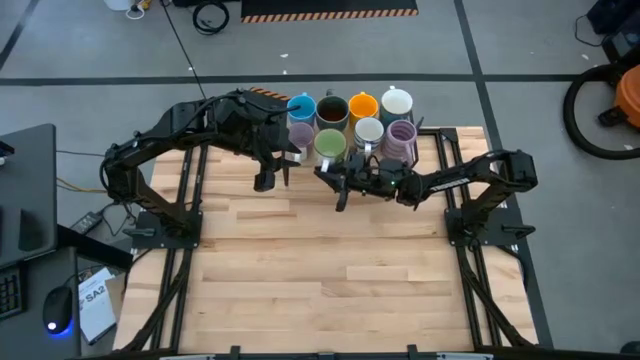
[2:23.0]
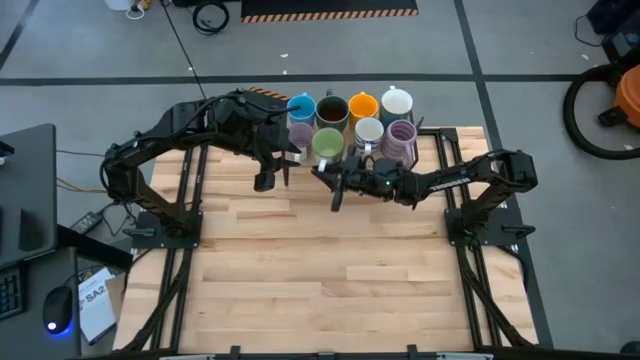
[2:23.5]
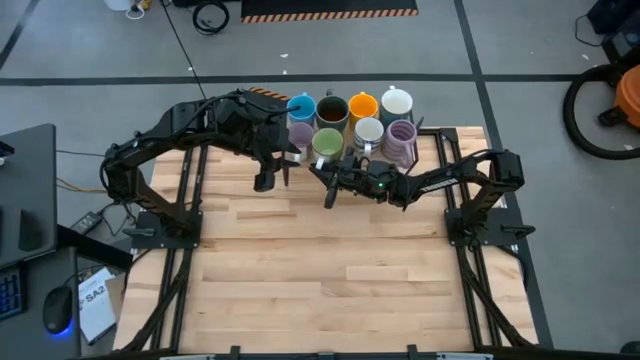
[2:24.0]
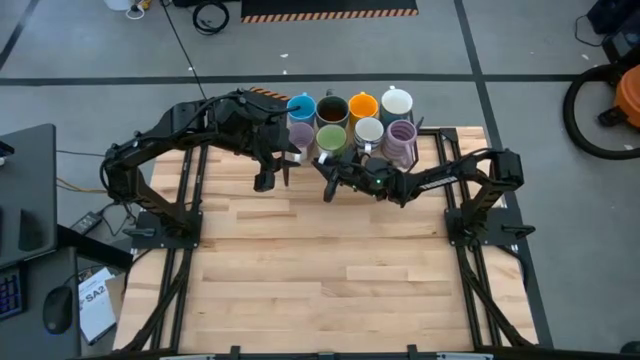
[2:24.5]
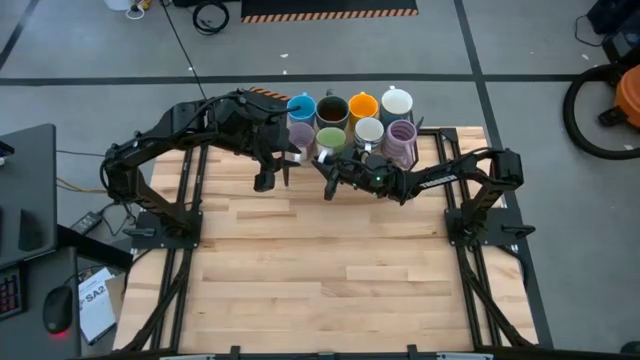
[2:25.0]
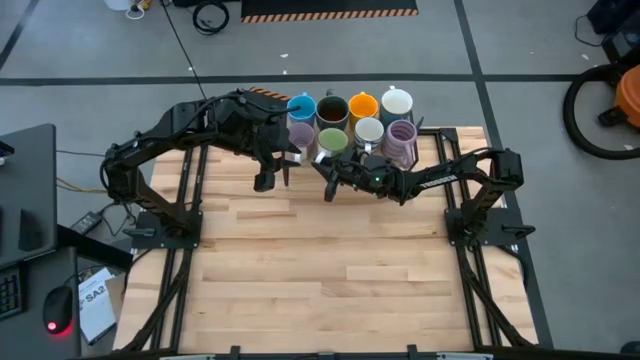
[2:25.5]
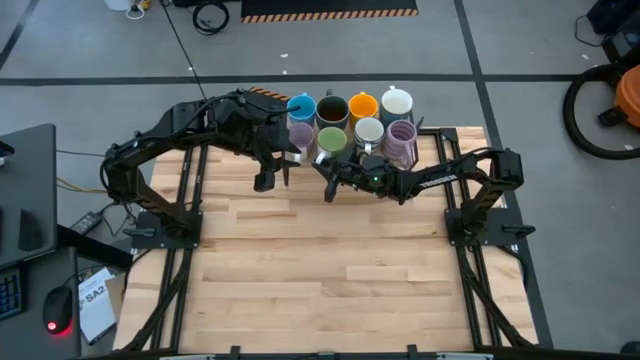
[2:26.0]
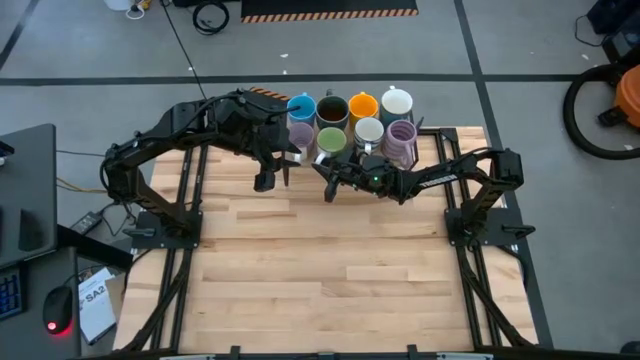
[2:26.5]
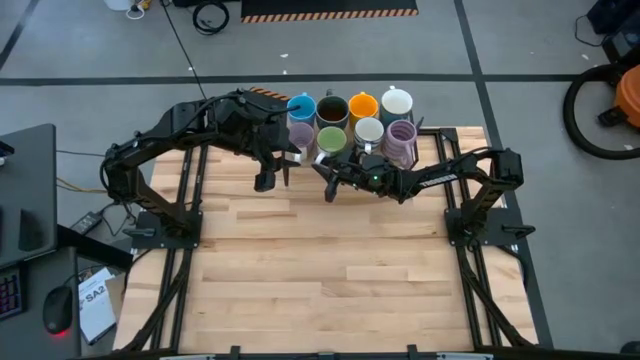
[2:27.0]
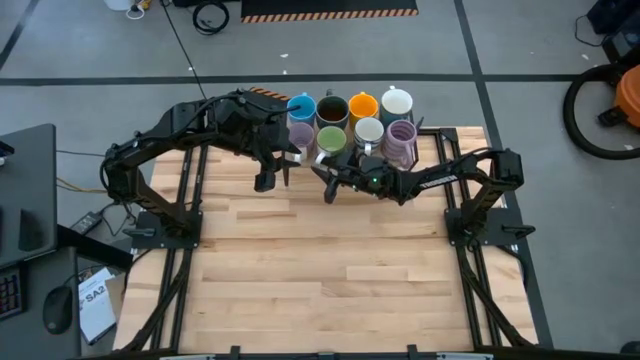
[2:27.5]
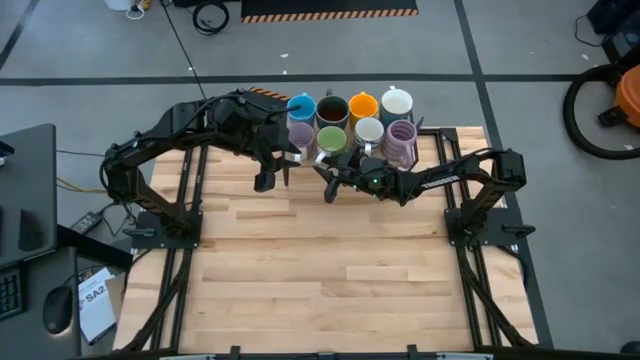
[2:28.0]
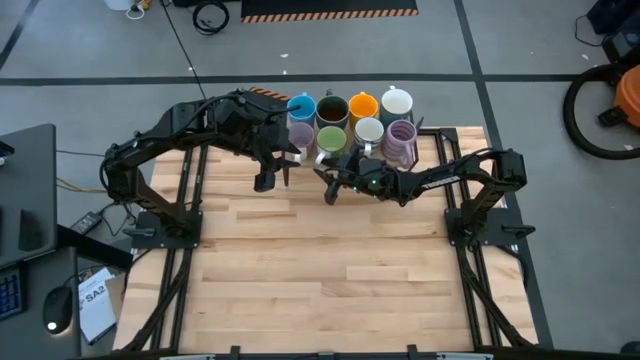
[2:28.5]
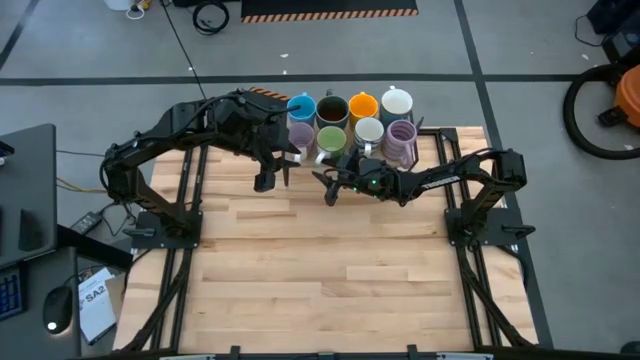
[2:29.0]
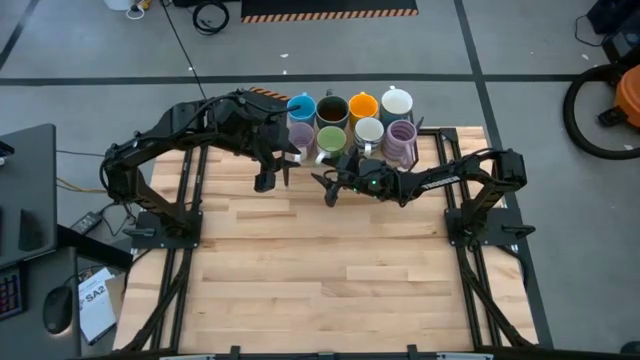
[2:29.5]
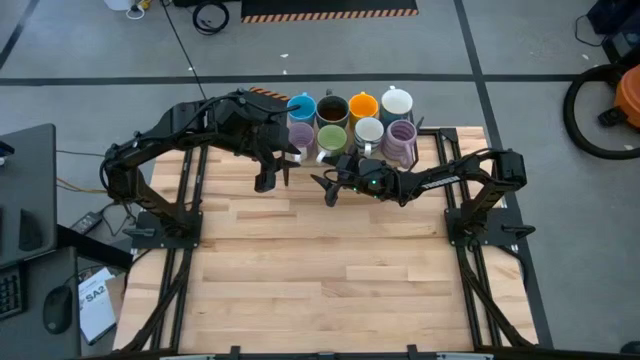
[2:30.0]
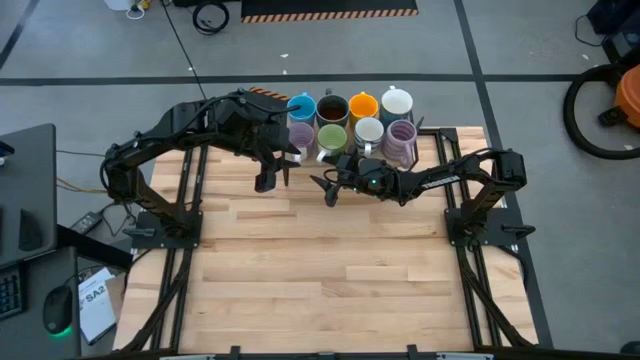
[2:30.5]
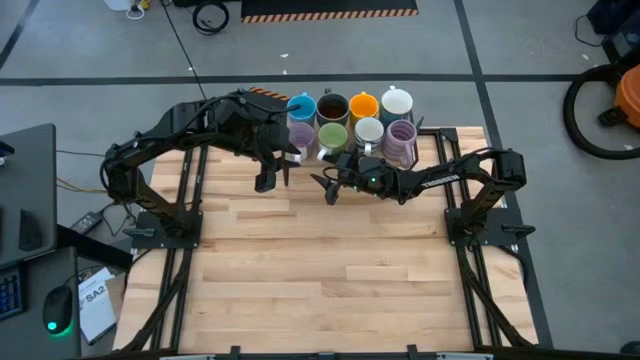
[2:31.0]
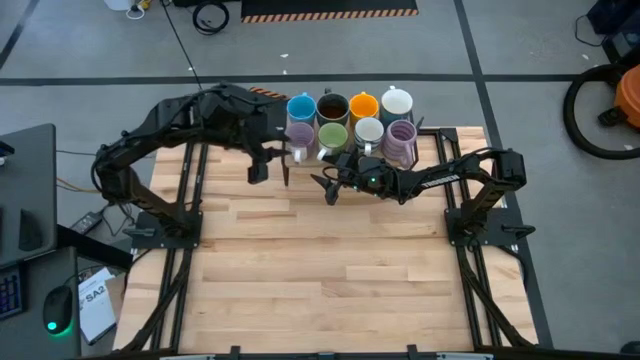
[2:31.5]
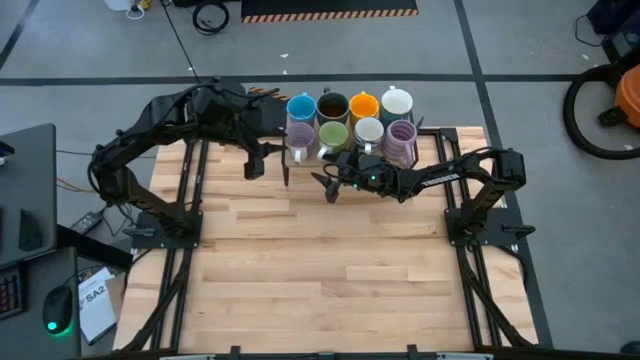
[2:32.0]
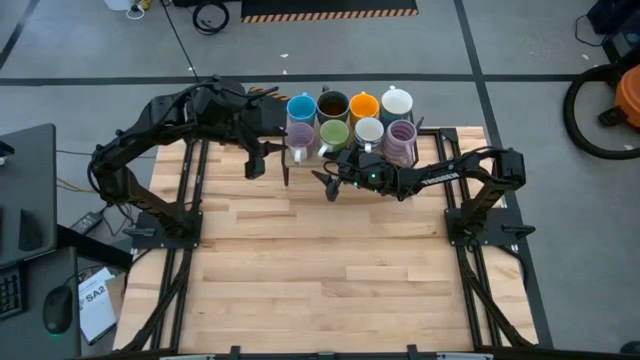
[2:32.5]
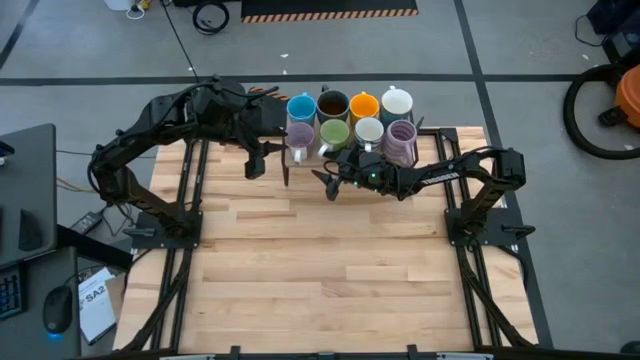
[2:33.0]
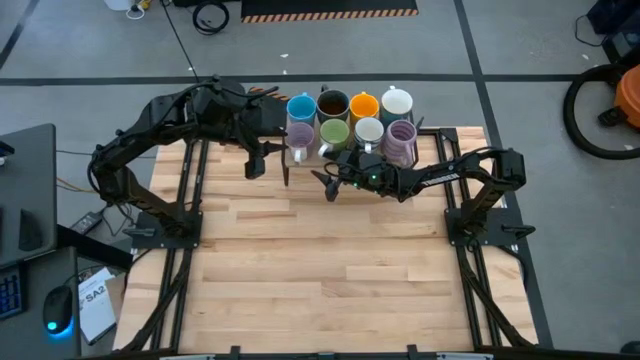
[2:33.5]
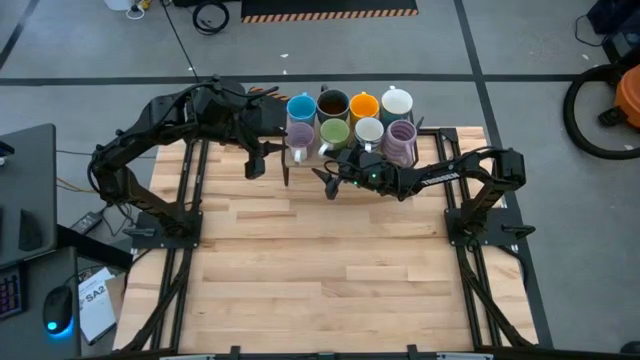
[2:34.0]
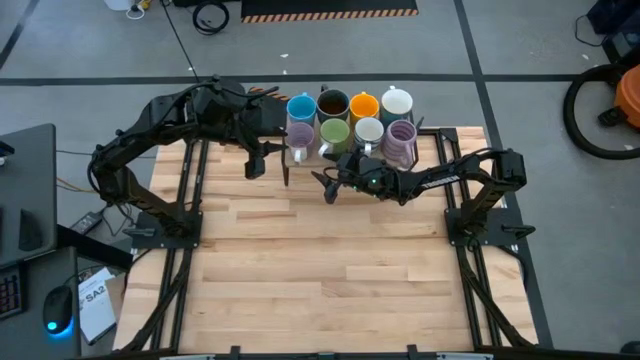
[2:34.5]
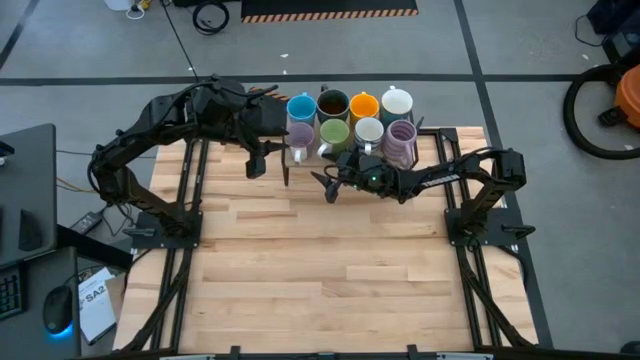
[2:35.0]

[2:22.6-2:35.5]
Task: Place coffee mugs
Put the green mug on the shelf

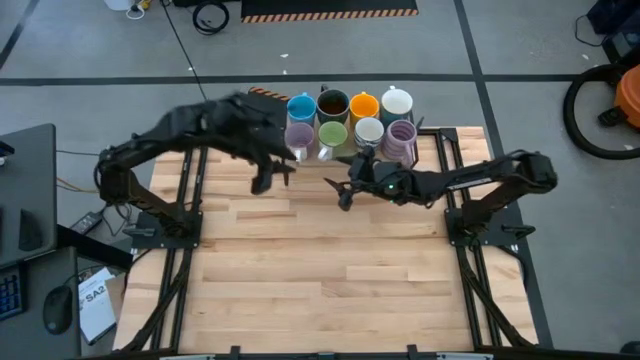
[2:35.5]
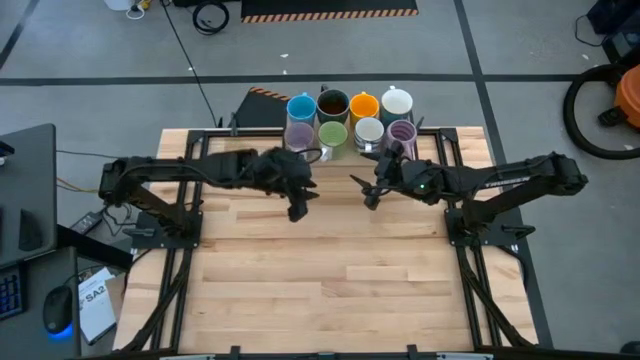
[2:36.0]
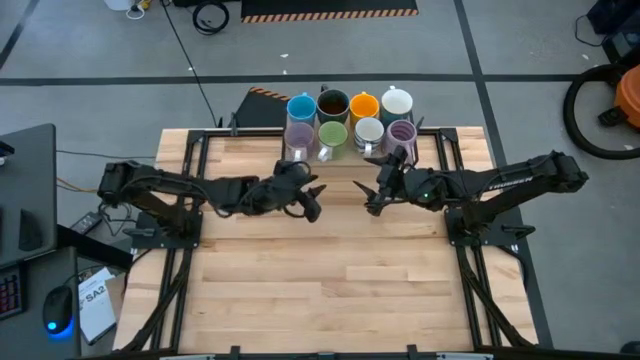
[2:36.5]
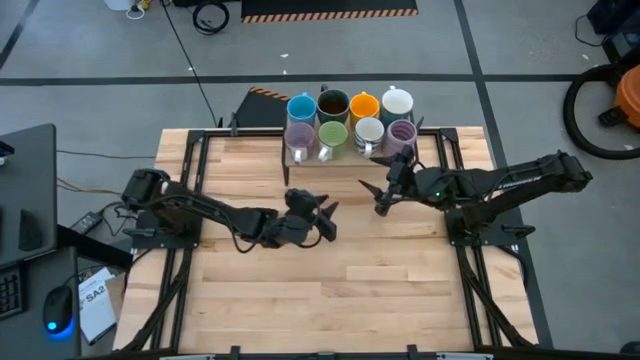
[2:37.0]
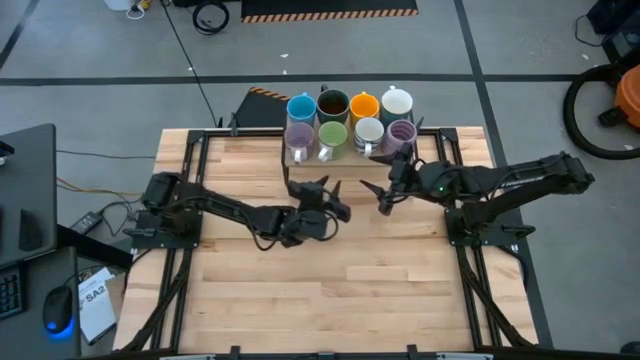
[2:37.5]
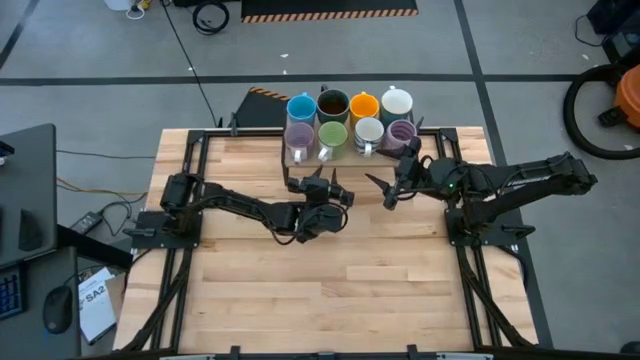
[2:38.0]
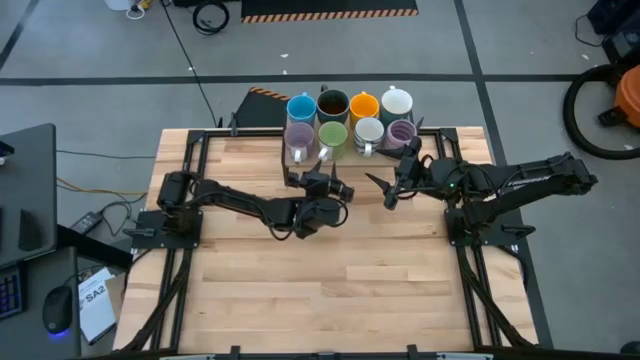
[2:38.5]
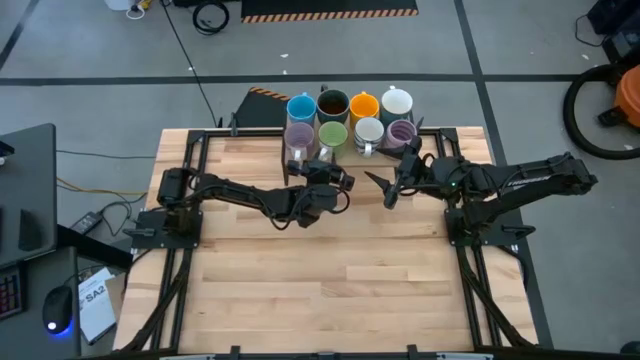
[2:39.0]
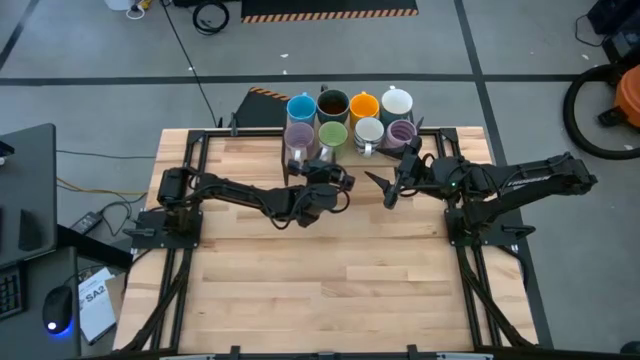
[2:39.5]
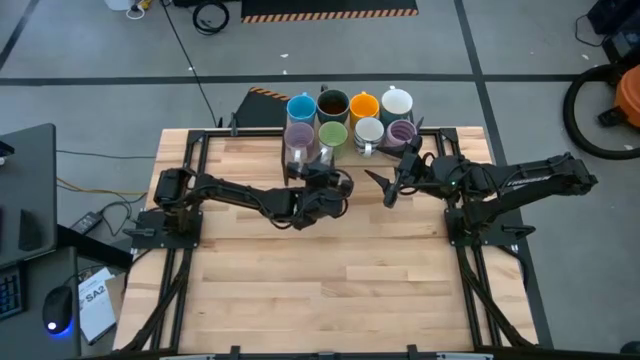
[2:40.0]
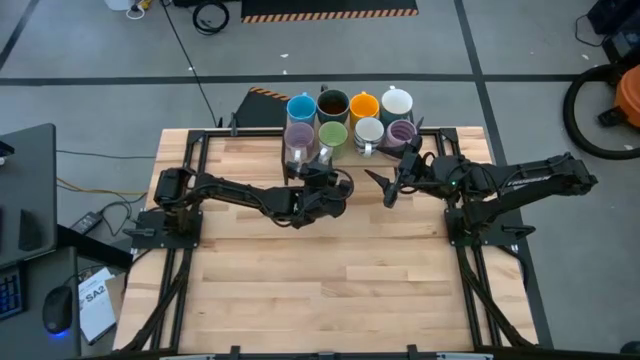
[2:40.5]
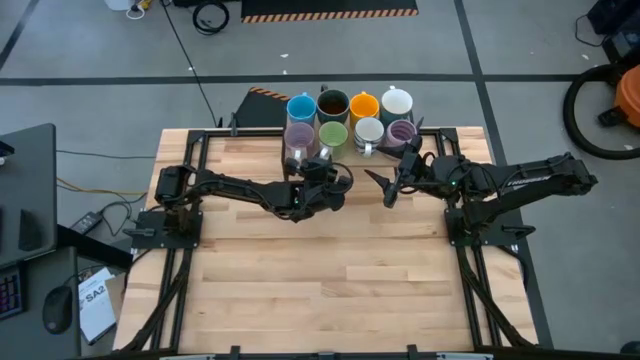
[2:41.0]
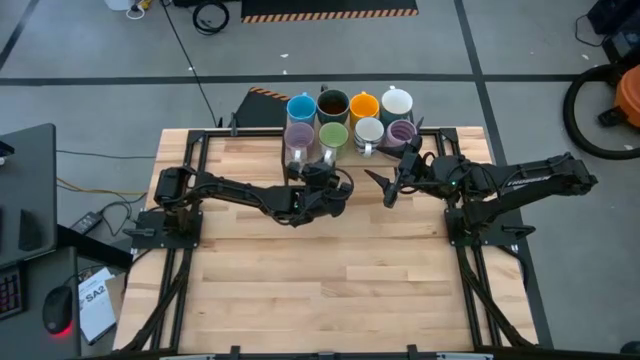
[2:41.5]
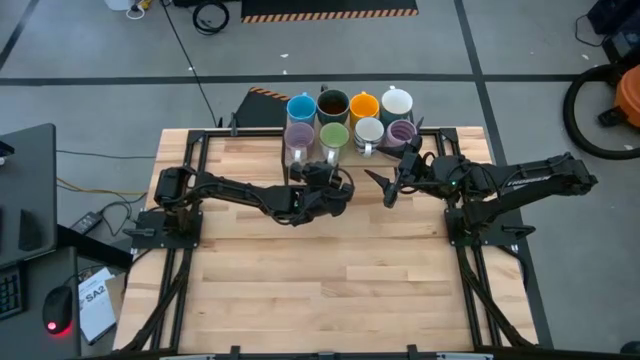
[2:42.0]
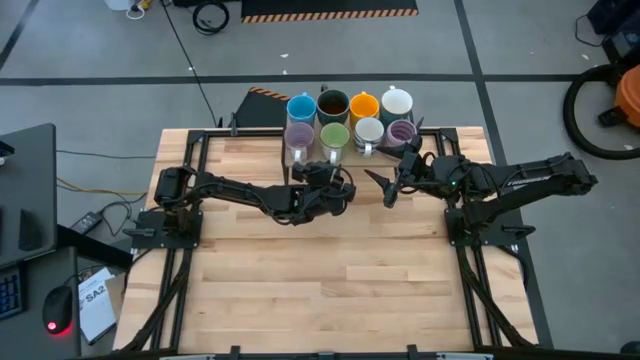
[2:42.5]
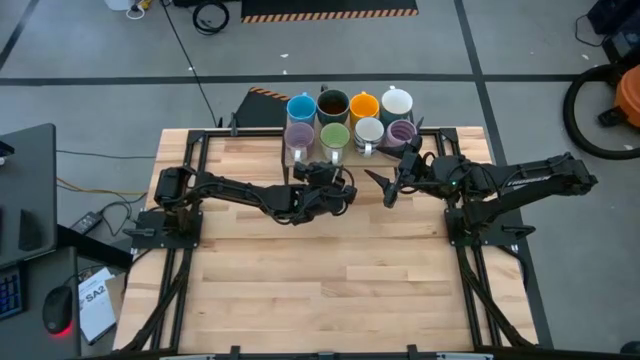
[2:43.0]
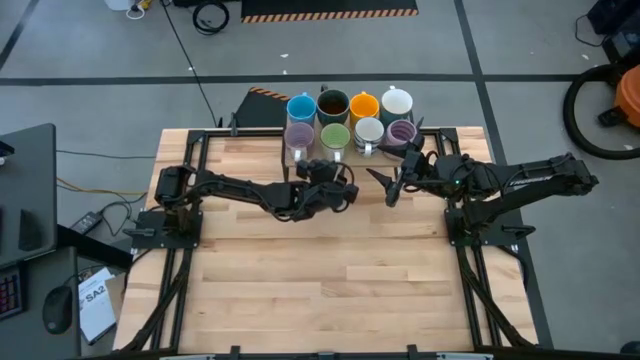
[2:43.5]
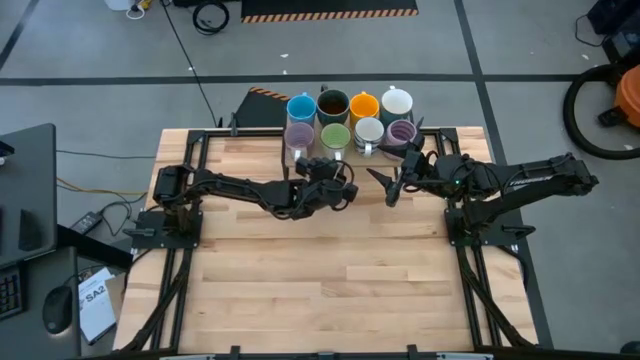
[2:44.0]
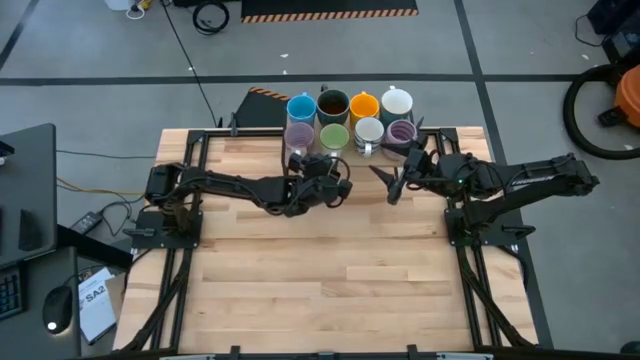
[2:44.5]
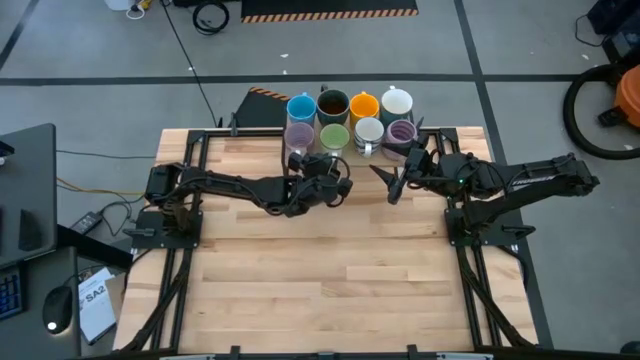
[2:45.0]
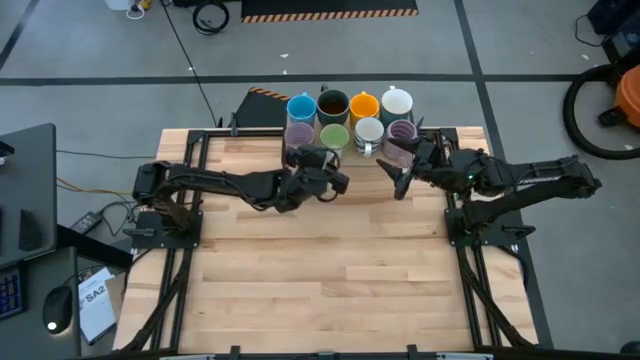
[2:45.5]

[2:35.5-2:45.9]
Adjust the green mug
